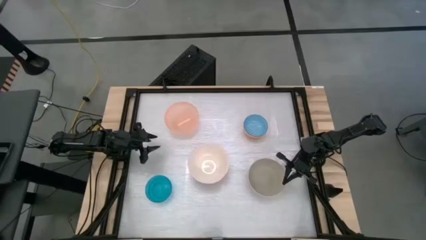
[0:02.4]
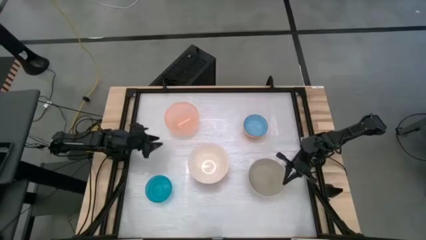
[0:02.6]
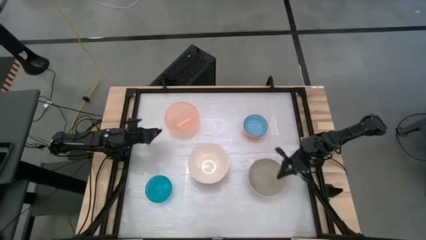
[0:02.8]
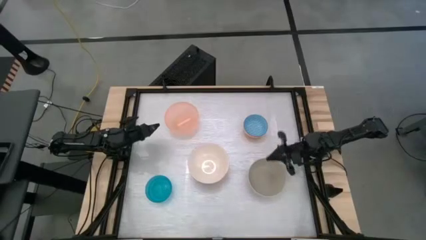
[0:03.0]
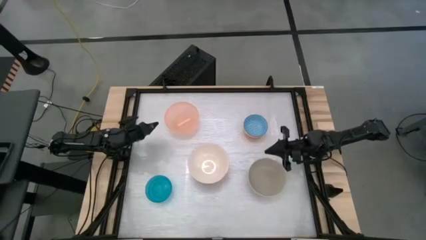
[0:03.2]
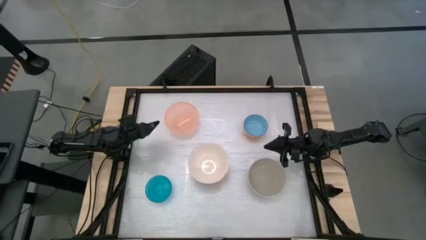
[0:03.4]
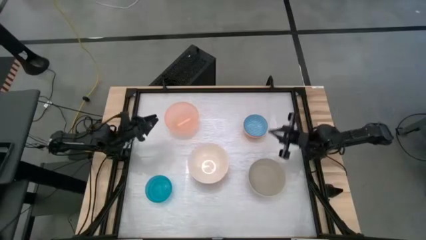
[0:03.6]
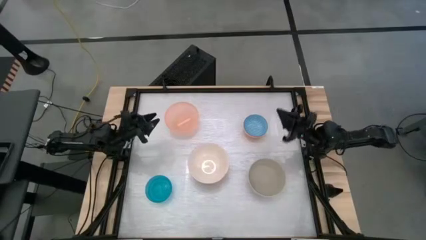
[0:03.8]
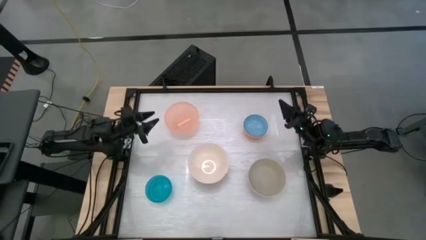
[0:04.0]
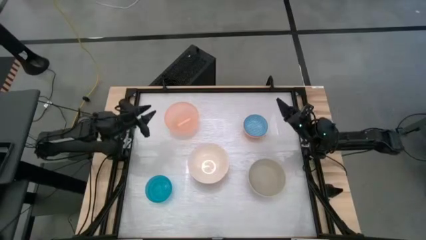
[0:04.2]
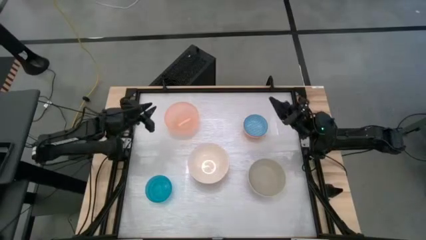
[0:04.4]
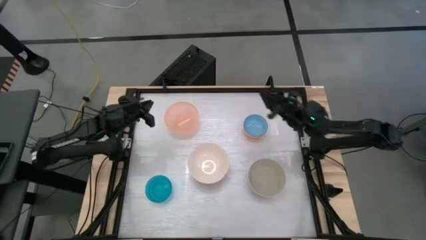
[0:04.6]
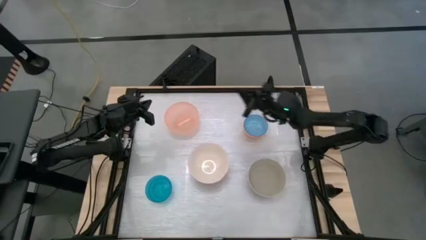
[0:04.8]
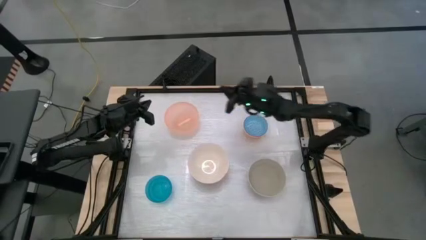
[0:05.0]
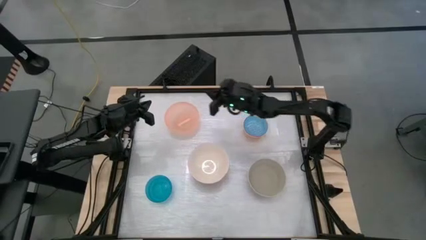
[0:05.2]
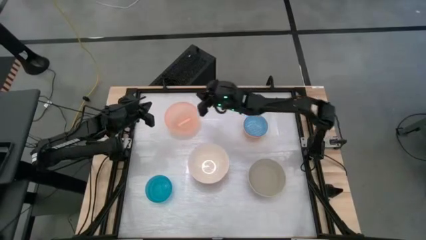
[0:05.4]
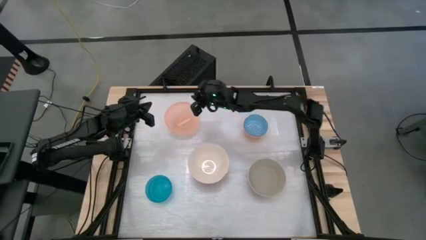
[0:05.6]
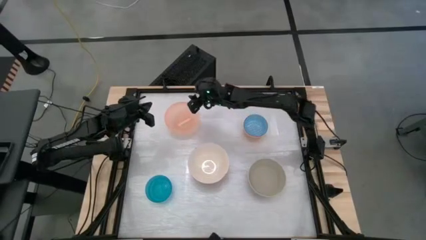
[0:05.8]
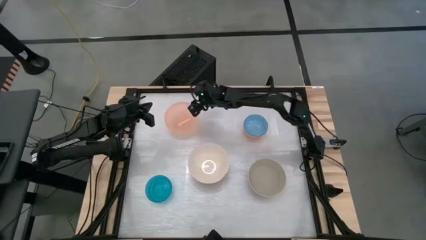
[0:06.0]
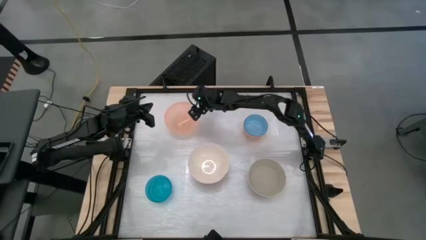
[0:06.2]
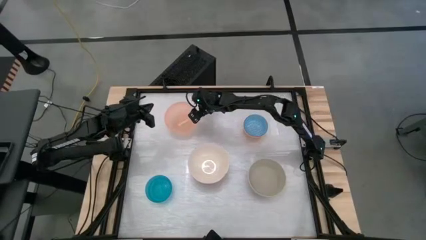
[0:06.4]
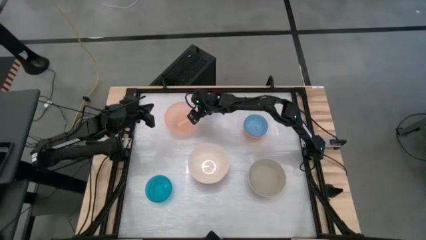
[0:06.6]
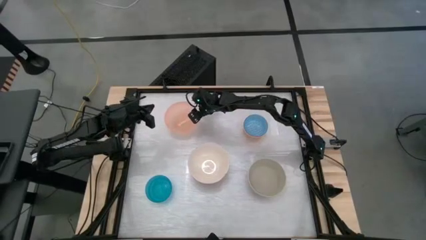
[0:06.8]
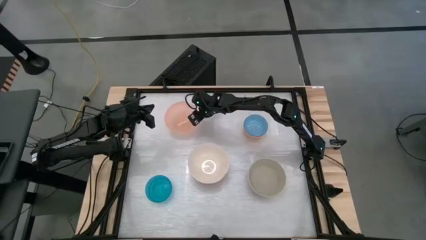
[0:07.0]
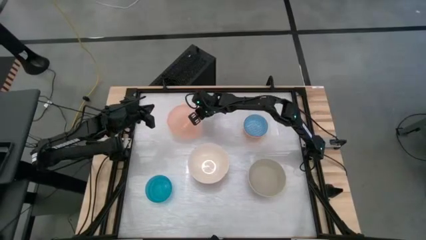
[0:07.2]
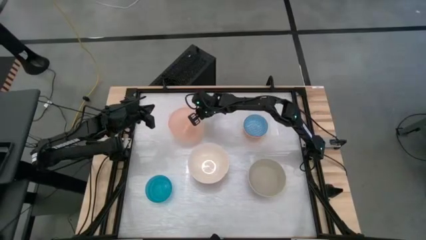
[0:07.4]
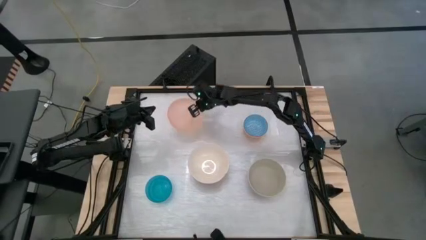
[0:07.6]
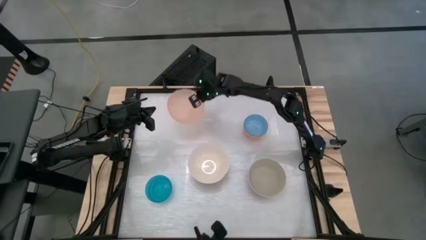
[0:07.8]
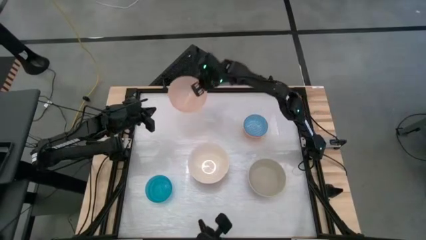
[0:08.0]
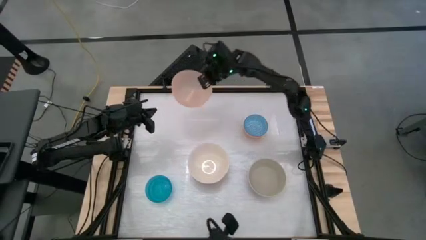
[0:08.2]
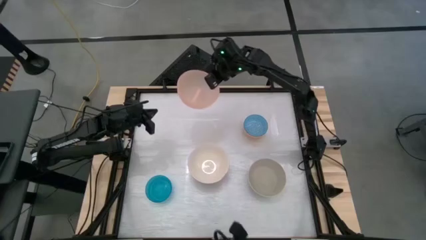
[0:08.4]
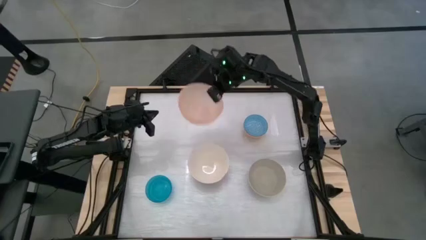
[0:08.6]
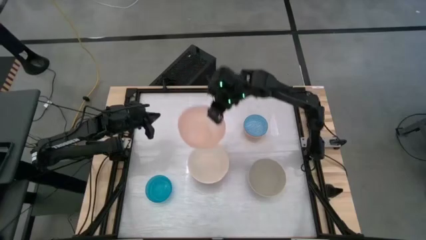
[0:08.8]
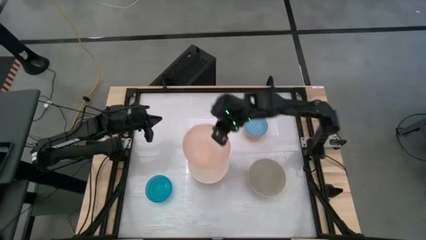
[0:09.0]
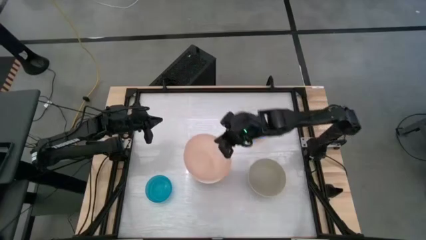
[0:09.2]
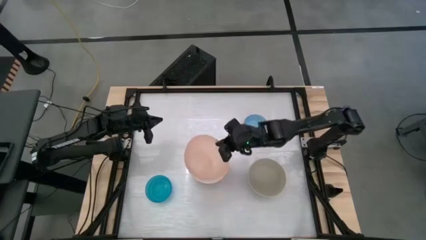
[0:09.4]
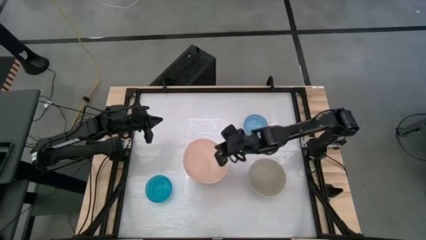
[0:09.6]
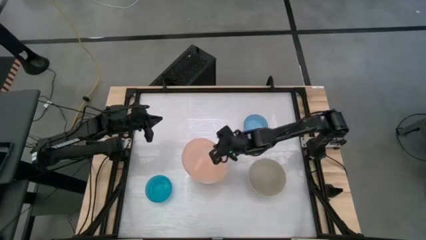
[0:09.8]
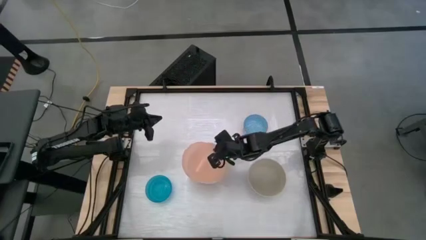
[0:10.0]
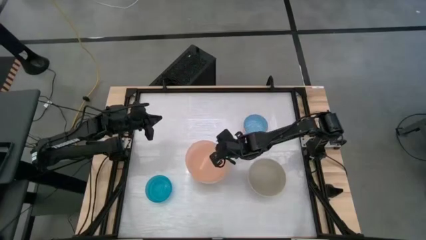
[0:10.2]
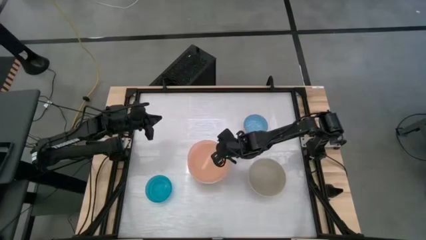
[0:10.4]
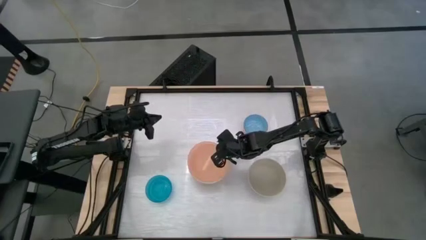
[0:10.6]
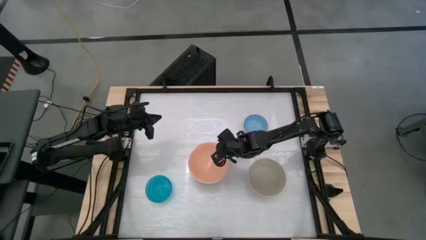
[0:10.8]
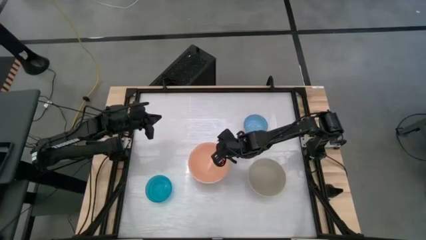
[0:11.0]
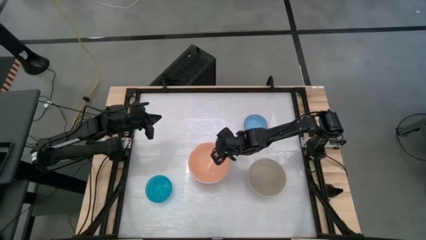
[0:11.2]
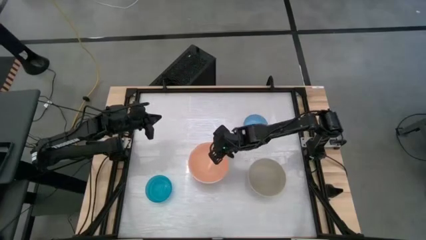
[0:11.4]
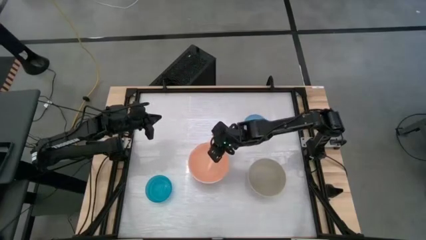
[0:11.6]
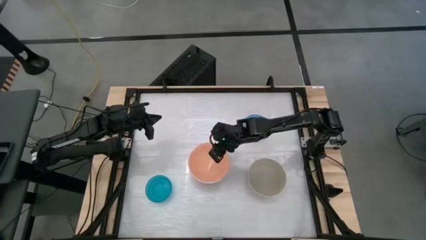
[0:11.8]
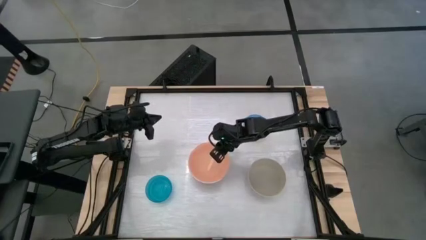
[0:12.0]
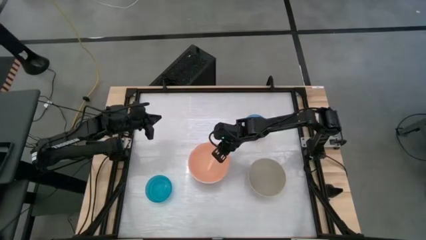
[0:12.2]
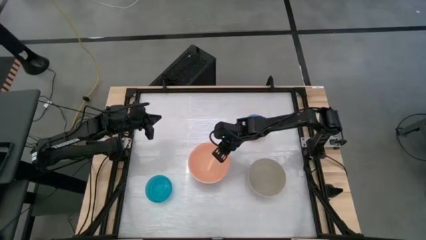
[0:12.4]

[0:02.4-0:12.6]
Stack the orange bowl into the pink bowl

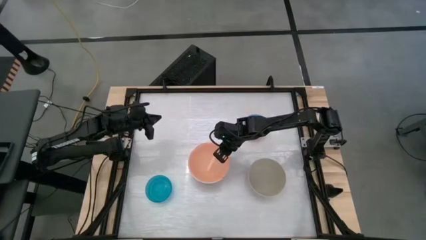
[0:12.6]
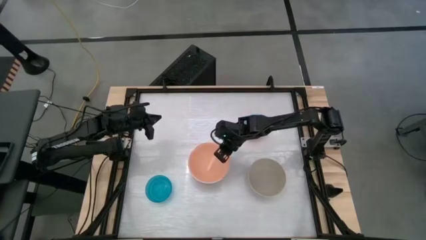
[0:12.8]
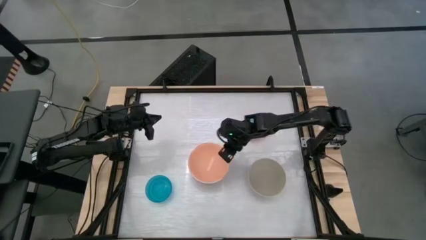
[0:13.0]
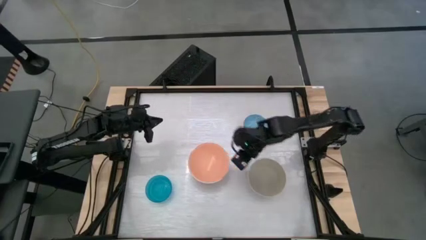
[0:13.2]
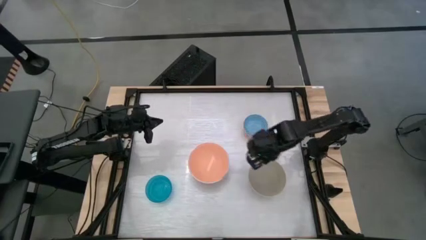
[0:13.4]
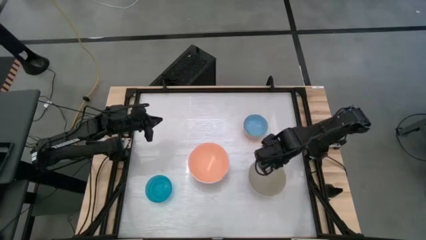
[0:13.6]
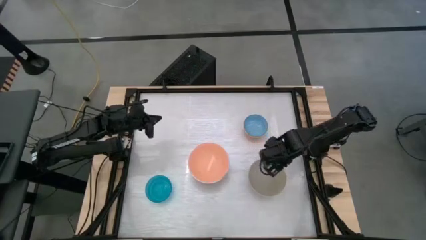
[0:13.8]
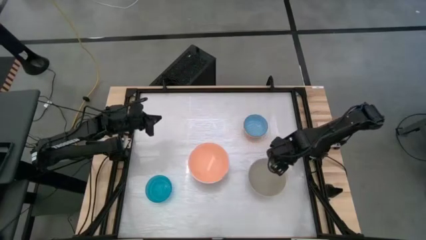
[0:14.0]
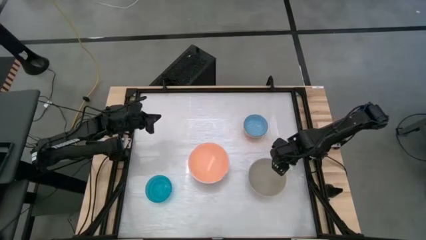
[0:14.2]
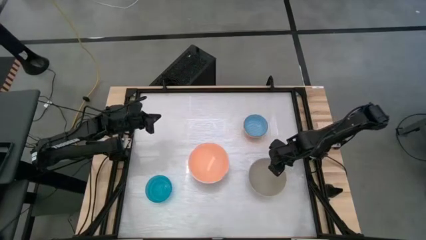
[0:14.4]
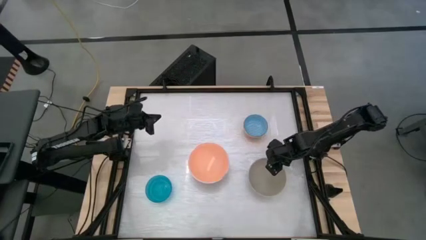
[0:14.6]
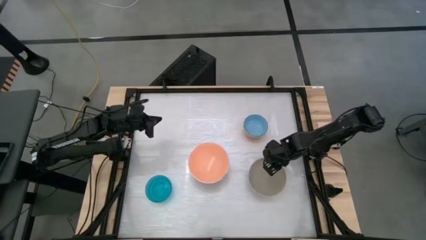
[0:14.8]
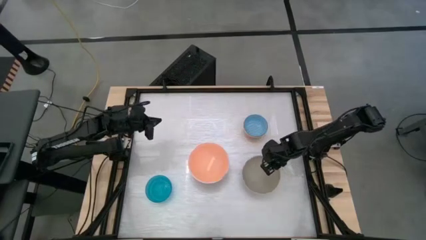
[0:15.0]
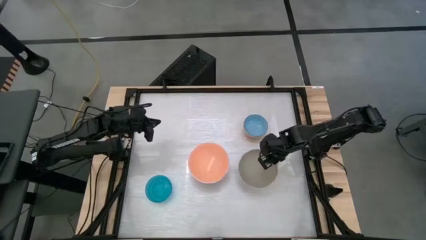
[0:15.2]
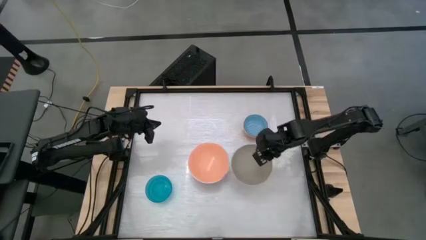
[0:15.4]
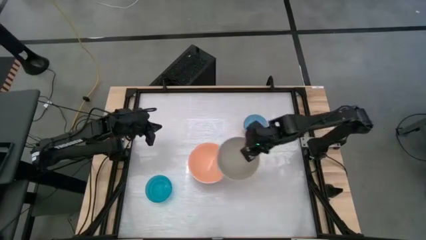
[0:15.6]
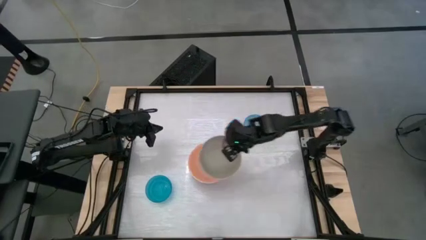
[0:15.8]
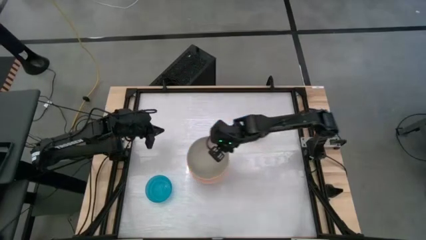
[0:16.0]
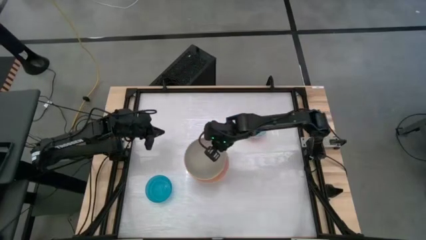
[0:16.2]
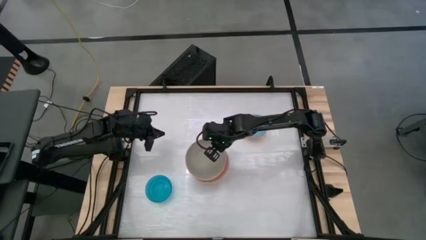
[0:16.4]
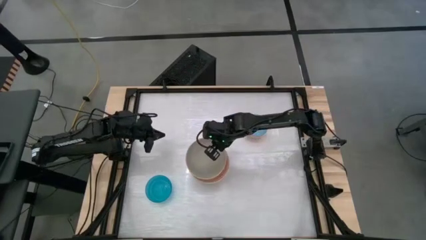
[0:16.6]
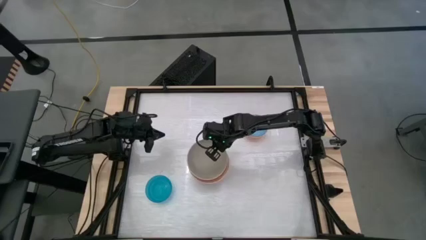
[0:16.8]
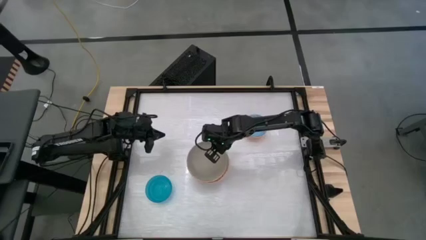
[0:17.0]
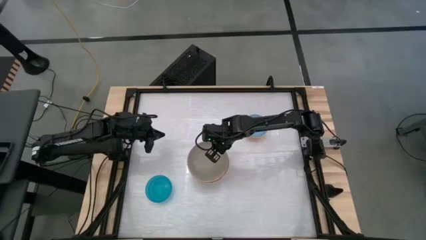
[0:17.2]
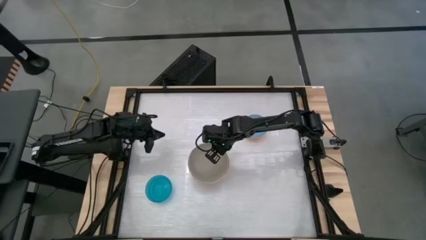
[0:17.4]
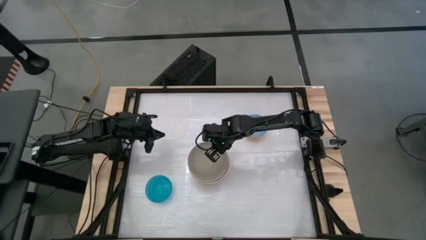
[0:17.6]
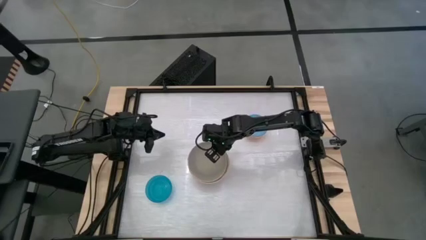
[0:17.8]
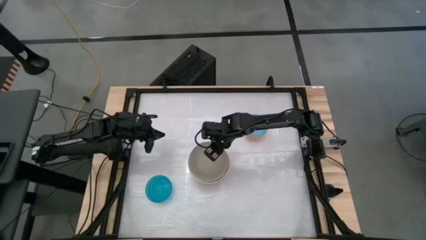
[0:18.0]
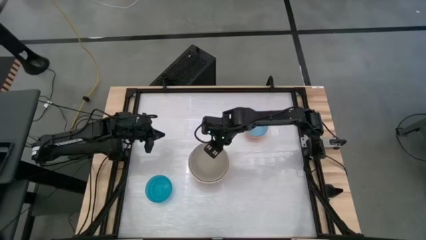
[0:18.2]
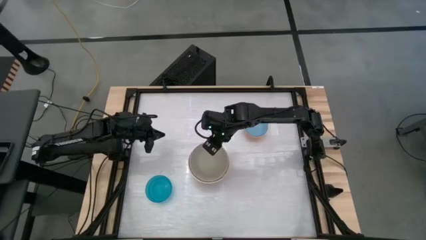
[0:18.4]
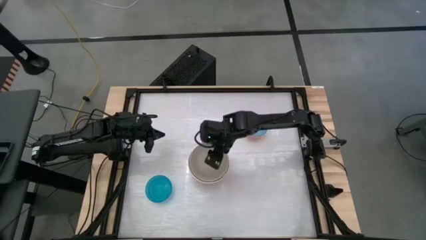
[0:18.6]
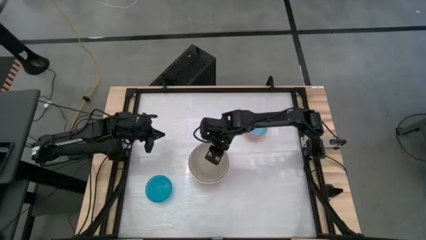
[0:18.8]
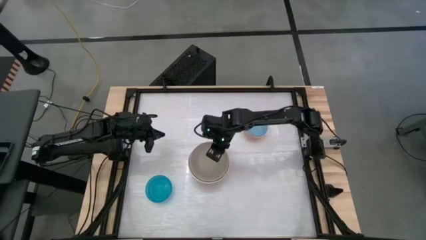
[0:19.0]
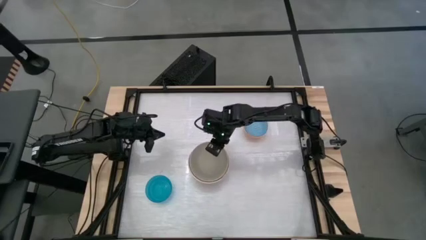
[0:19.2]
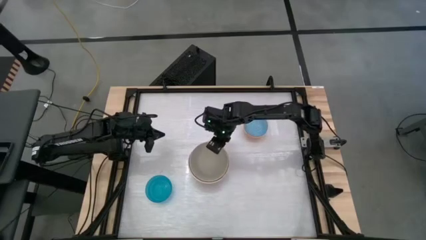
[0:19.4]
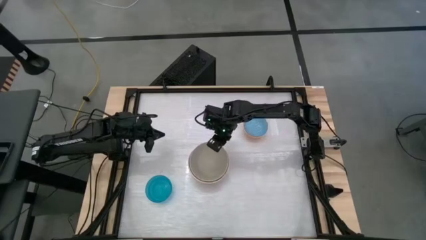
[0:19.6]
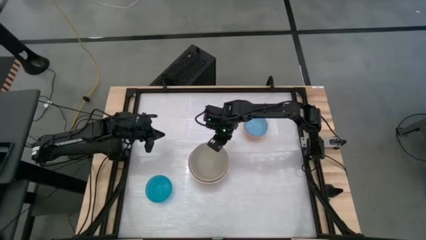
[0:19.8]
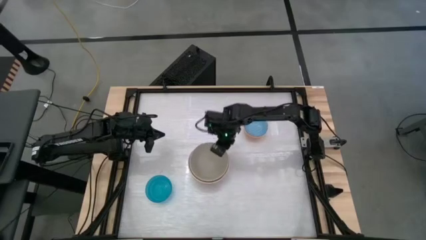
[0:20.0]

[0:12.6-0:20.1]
Stack the gray bowl into the orange bowl
